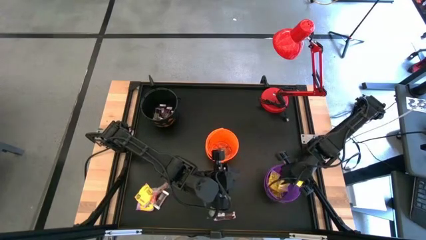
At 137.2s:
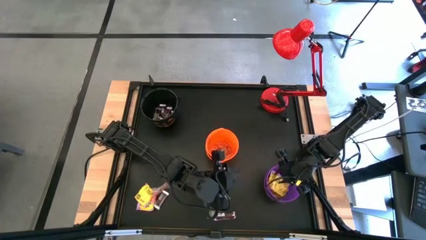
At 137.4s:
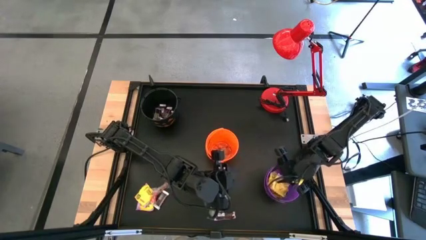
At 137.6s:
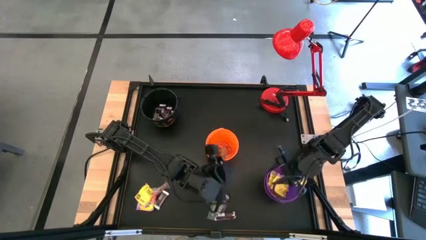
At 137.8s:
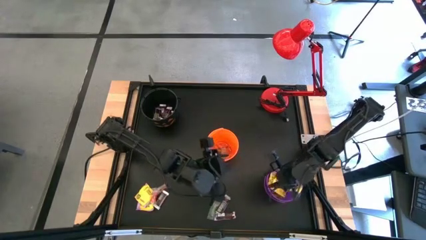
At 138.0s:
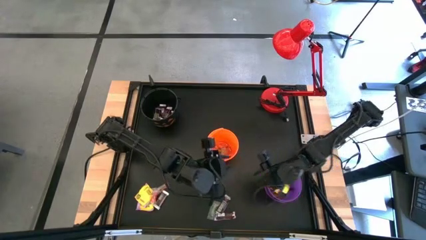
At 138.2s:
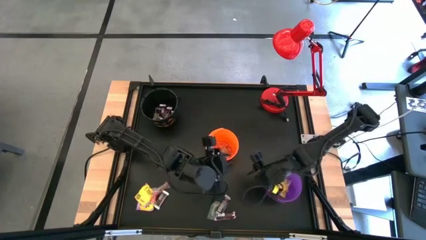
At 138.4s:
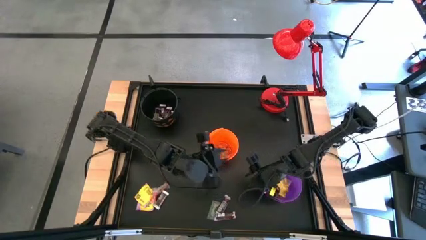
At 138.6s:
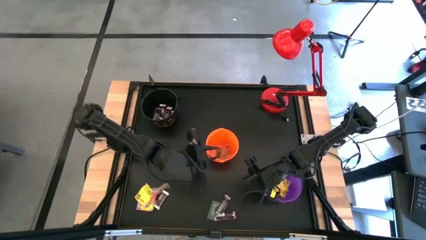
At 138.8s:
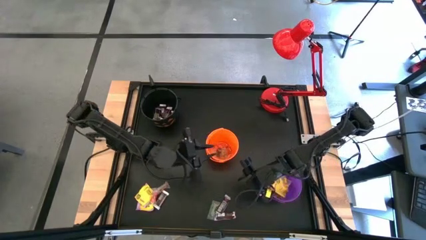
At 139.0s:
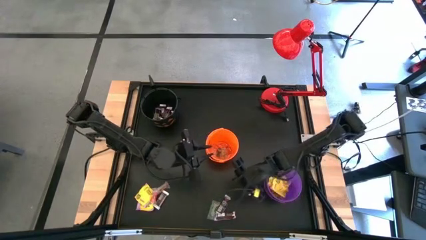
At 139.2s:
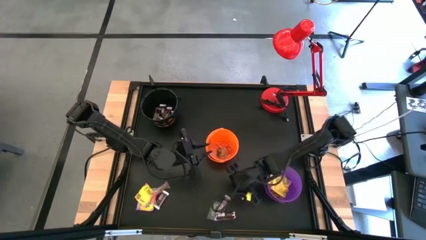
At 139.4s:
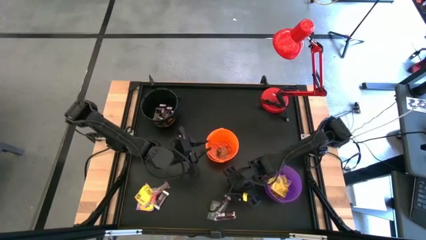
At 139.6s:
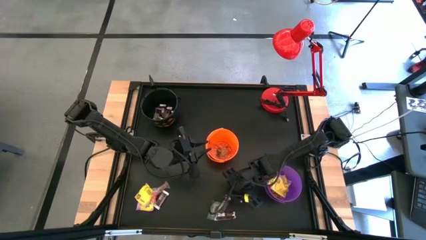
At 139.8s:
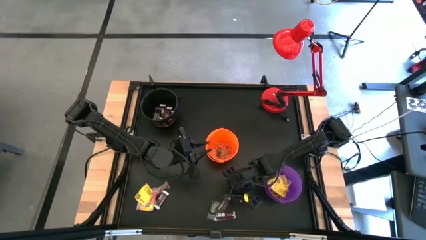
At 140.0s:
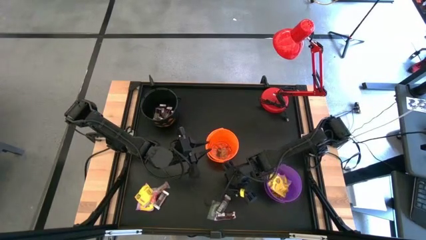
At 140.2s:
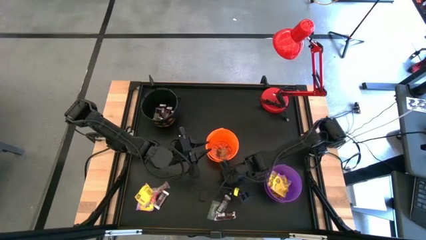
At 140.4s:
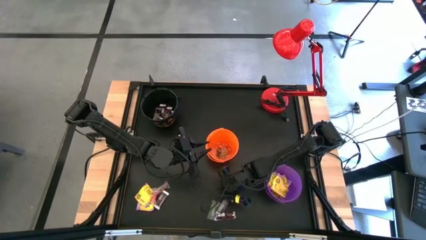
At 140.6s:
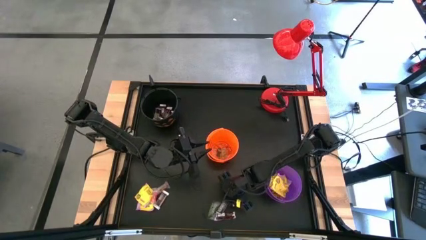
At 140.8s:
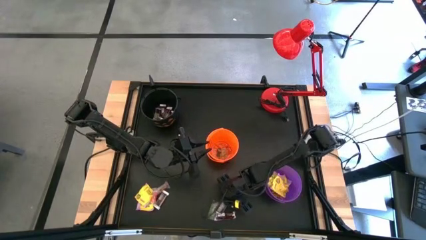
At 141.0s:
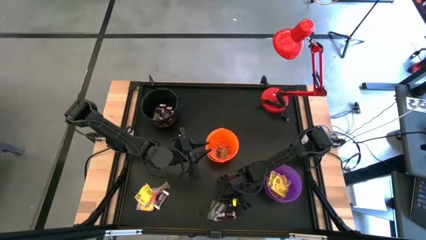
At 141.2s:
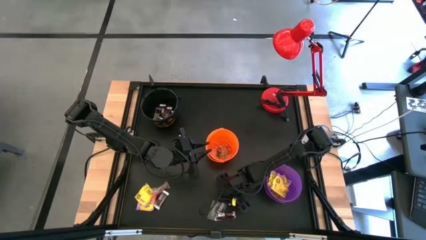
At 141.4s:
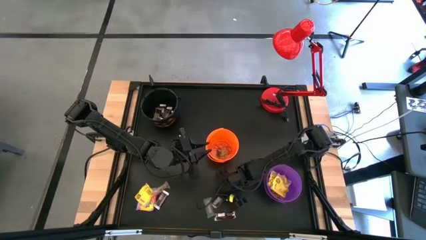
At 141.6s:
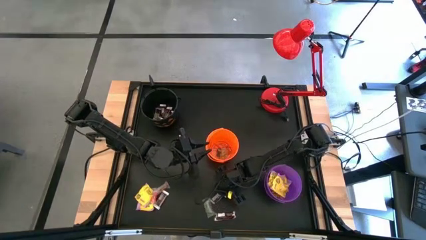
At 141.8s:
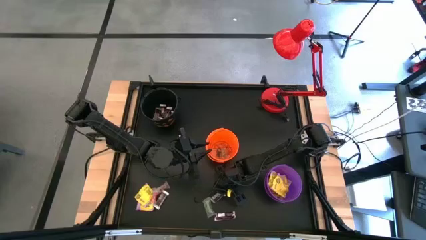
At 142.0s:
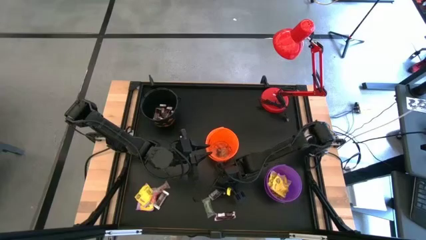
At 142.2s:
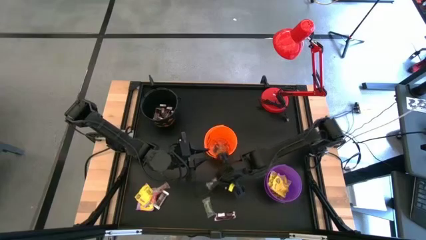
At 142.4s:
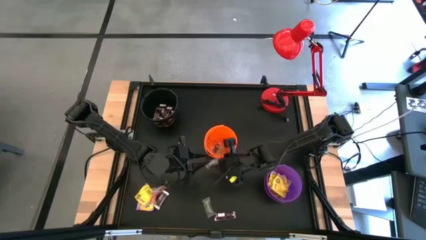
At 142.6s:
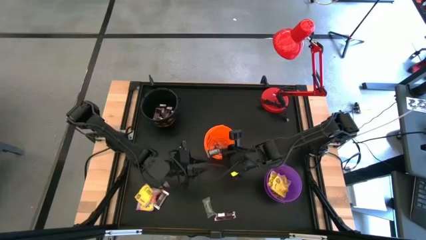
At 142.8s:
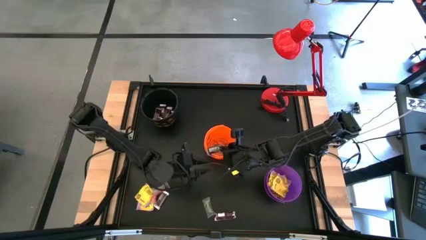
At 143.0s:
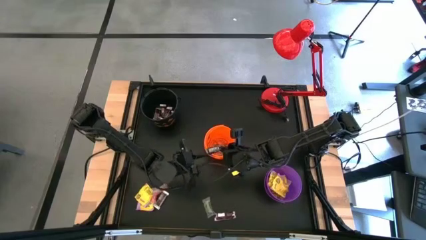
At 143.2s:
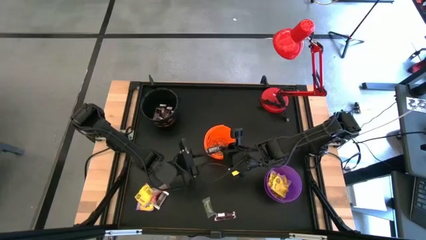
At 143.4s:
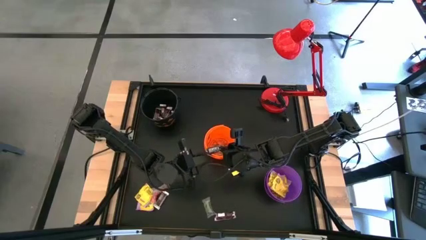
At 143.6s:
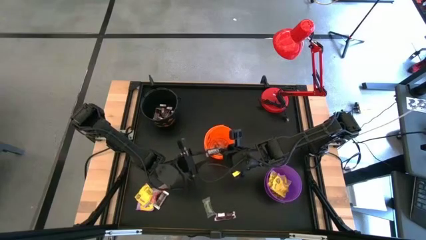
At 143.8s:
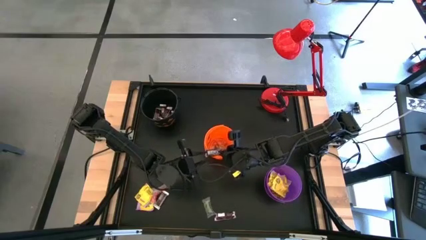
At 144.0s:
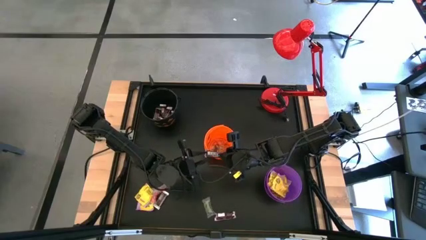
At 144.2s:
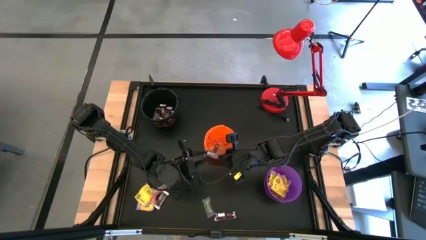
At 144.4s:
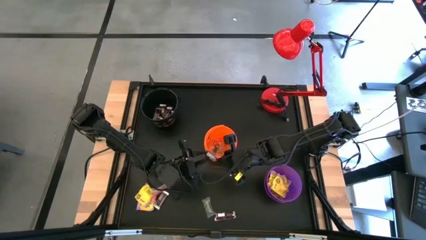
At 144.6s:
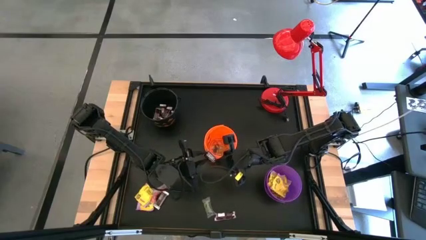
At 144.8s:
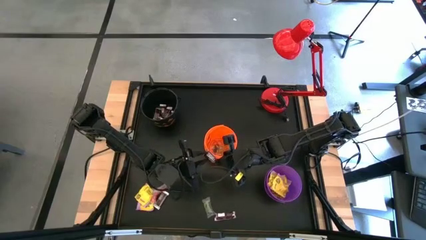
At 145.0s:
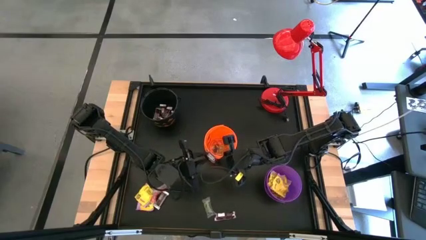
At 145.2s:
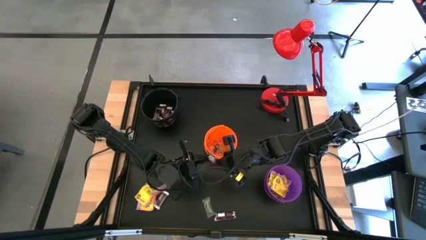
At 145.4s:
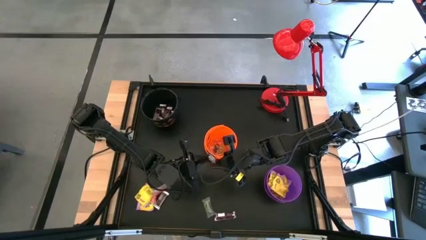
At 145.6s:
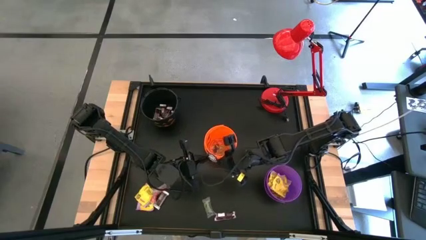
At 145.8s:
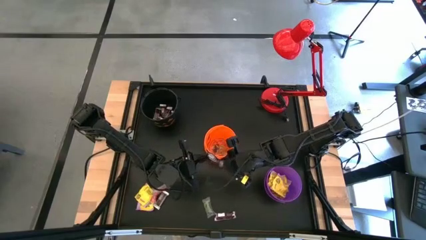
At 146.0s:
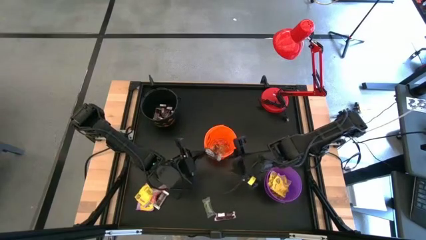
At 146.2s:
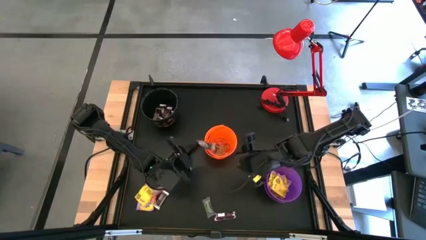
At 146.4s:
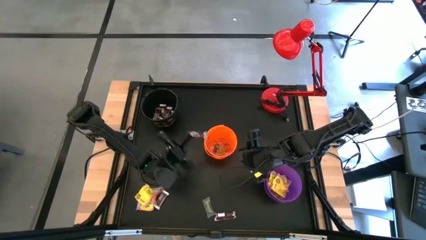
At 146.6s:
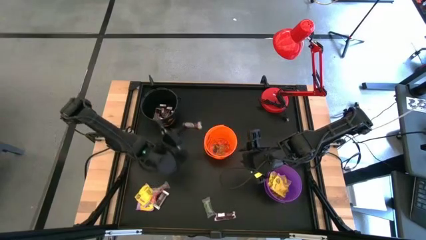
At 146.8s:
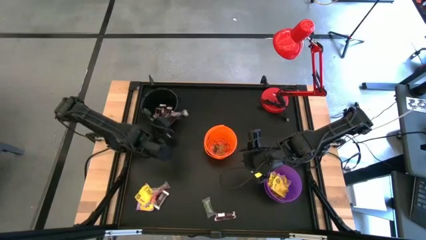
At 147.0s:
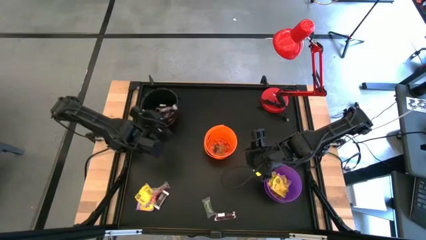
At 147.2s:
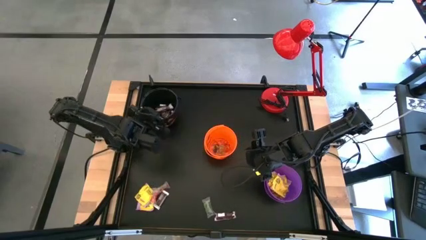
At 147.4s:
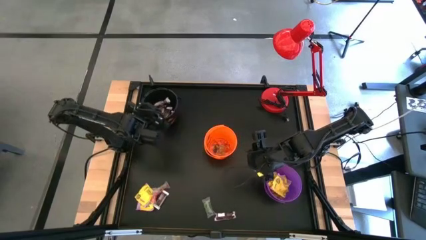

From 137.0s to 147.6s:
Task: Sort candy
Put the brown chocolate bar into the black bucket

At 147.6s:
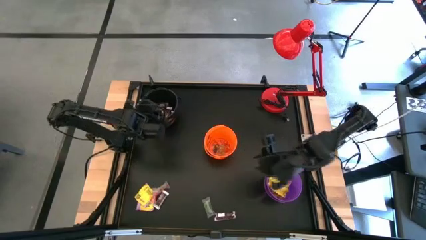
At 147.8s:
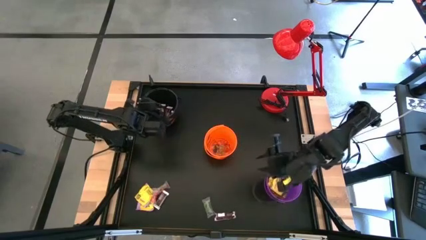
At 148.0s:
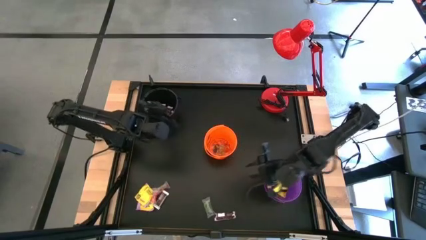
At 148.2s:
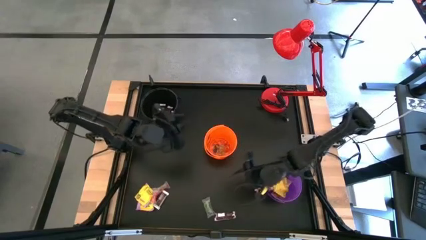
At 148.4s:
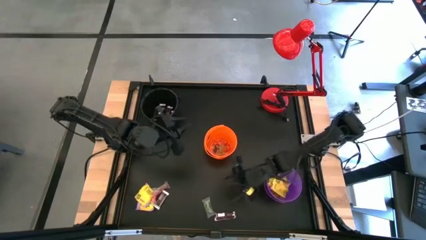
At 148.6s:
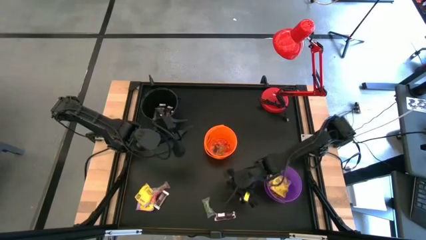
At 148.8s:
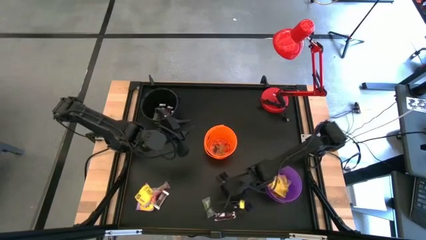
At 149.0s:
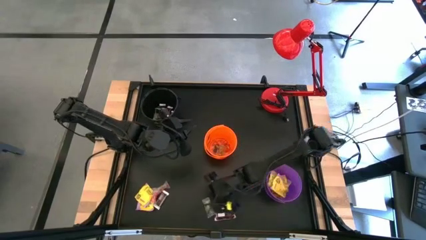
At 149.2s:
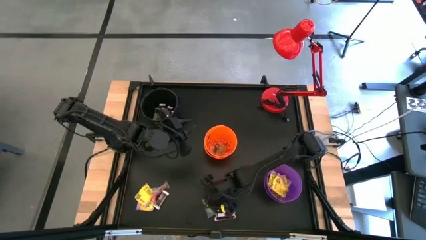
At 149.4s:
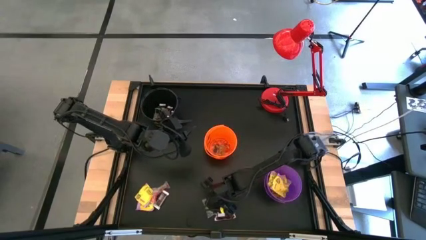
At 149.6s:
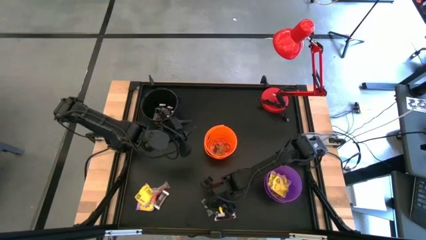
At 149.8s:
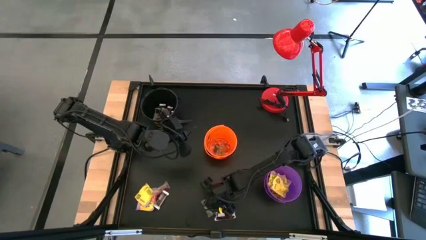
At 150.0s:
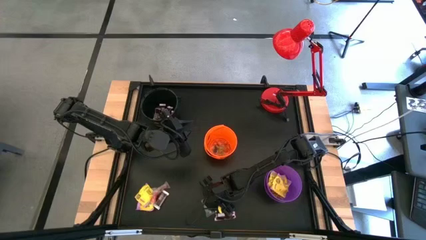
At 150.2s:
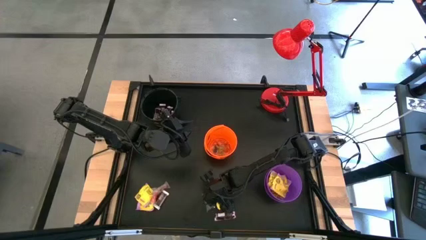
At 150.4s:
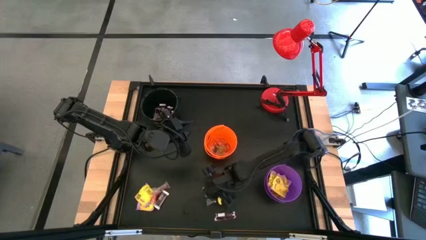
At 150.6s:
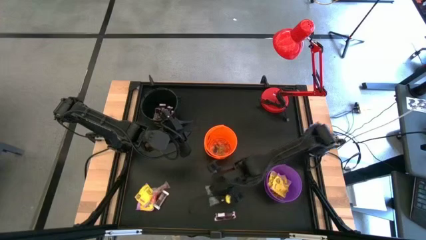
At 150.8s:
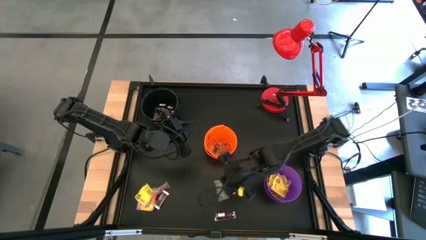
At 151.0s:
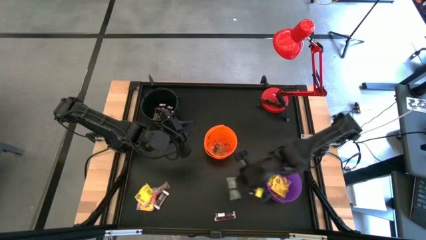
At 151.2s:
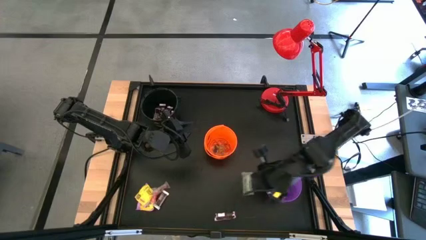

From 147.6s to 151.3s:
Put the green gummy into the orange bucket

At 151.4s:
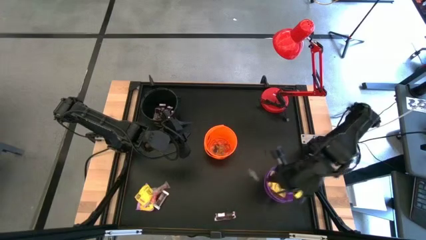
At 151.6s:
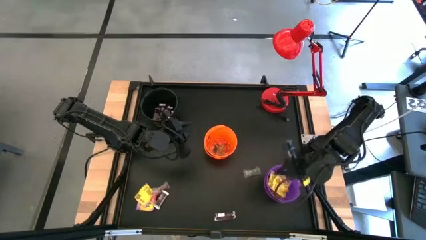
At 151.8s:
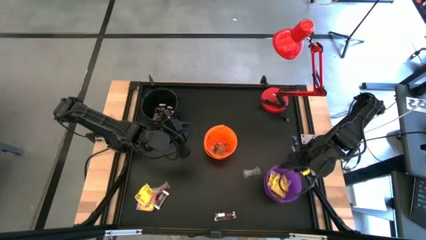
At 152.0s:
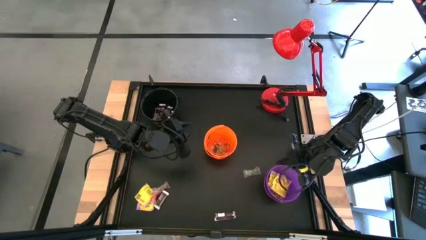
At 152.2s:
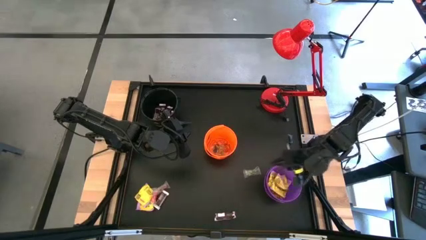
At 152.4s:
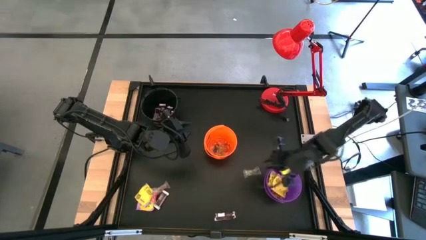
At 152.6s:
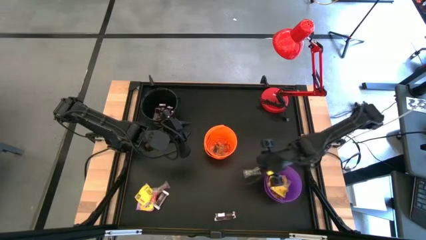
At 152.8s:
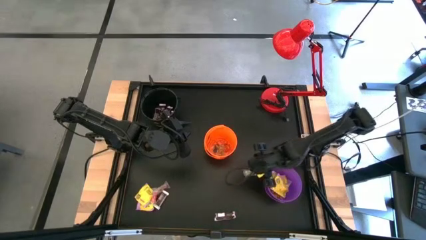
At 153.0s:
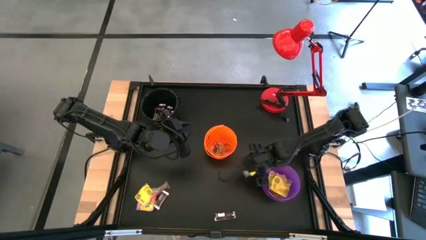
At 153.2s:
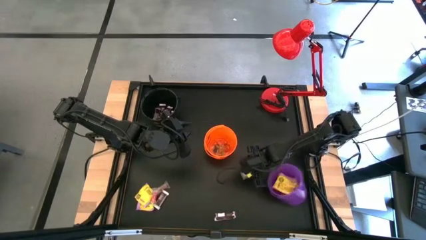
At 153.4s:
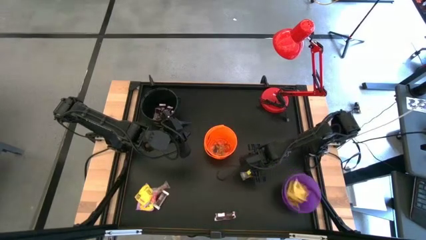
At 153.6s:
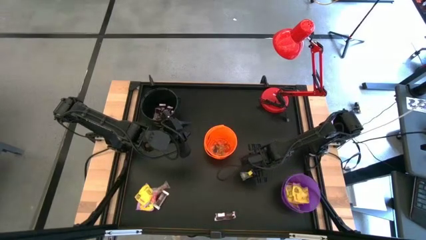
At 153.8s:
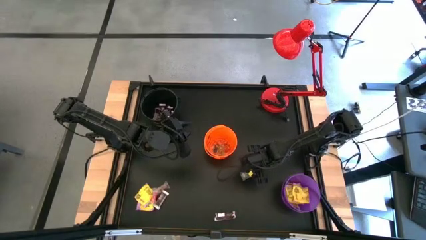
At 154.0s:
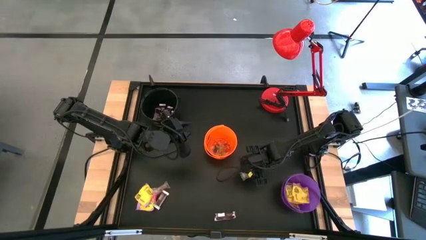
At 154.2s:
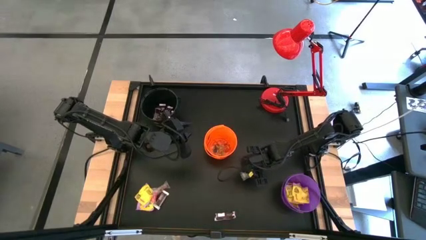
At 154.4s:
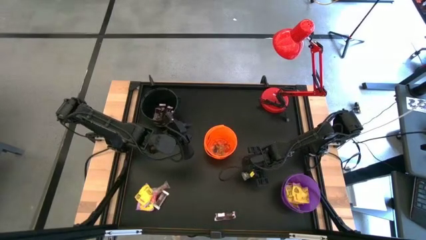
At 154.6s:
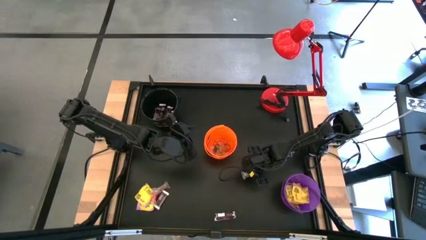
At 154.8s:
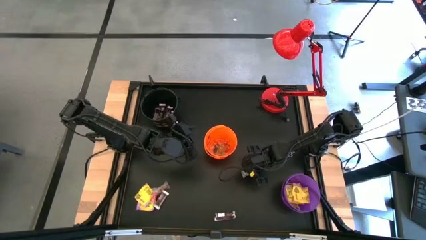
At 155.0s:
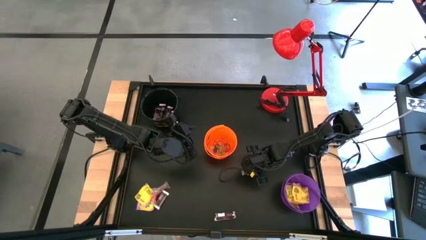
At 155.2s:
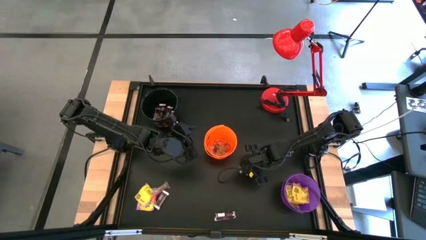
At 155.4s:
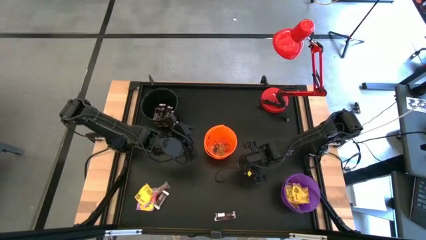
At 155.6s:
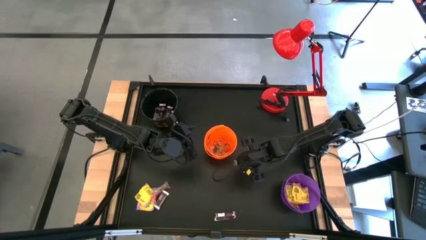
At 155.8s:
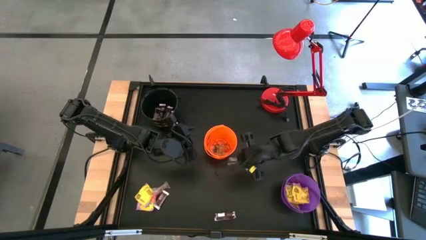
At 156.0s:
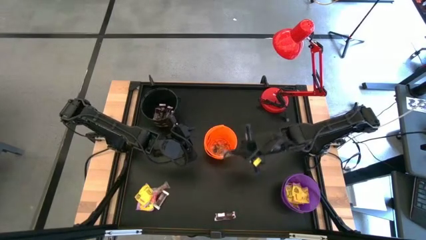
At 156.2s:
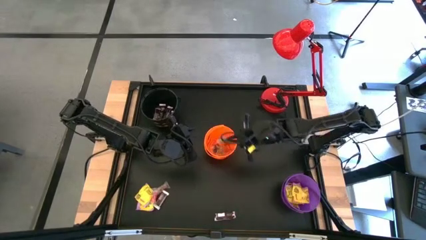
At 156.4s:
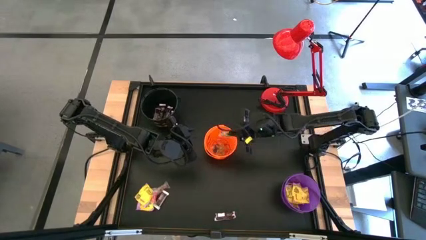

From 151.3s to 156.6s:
Put the green gummy into the orange bucket
